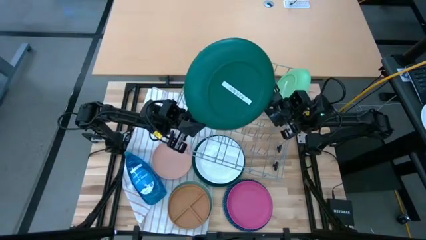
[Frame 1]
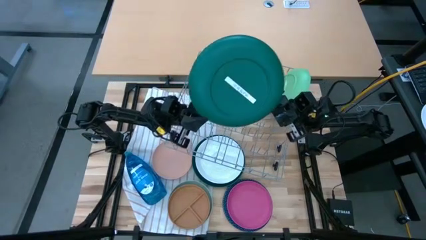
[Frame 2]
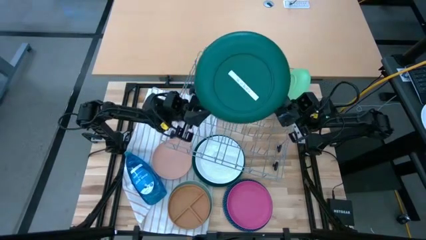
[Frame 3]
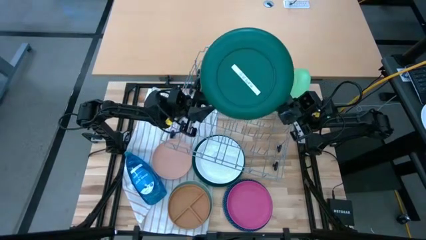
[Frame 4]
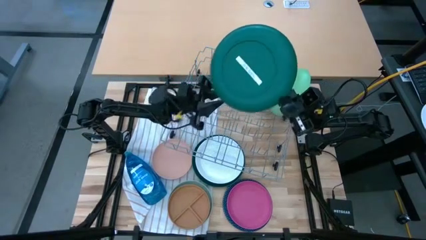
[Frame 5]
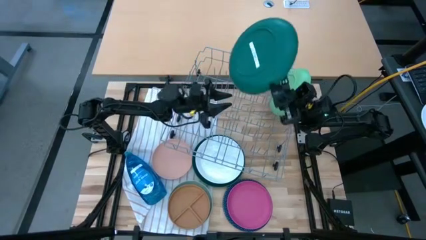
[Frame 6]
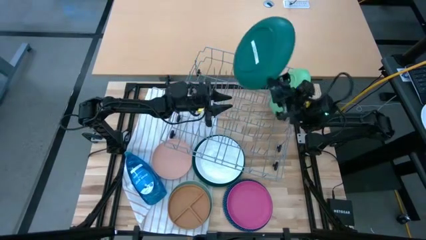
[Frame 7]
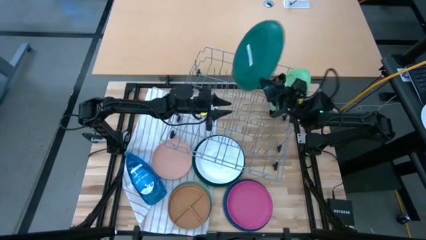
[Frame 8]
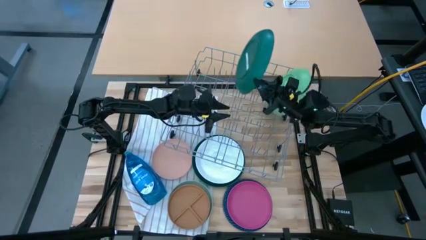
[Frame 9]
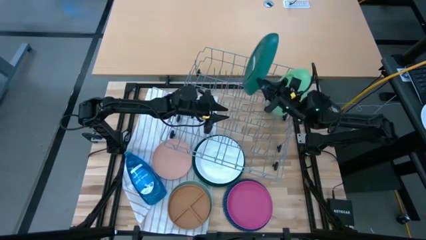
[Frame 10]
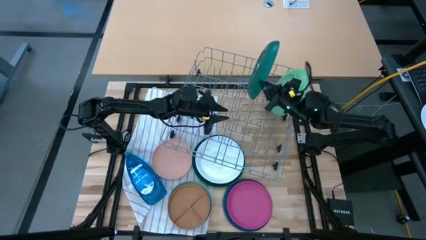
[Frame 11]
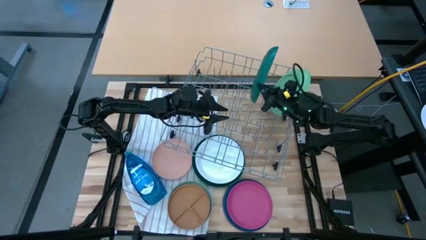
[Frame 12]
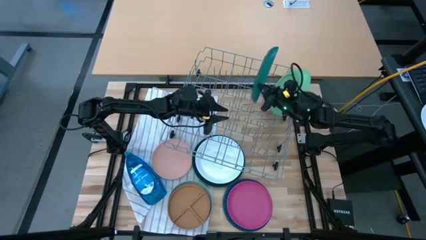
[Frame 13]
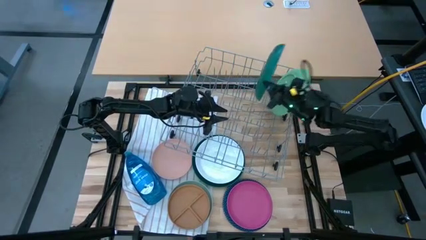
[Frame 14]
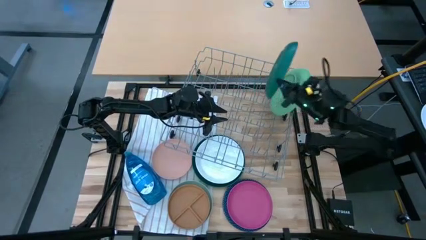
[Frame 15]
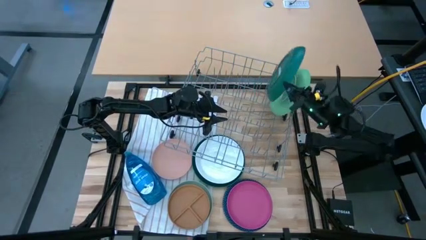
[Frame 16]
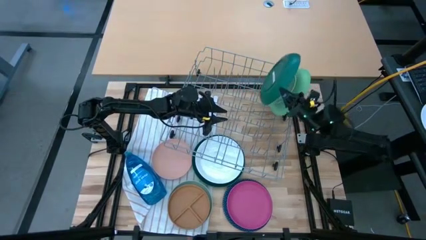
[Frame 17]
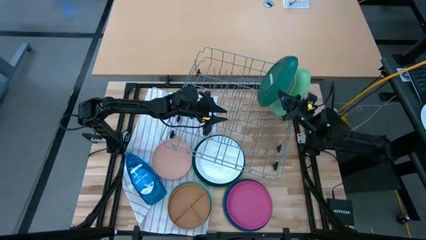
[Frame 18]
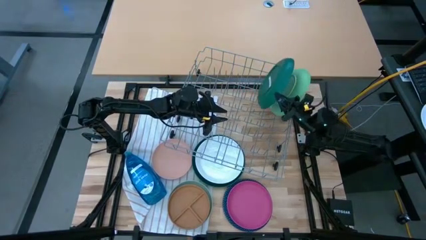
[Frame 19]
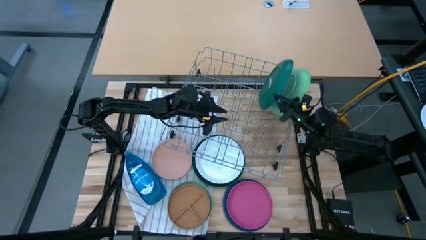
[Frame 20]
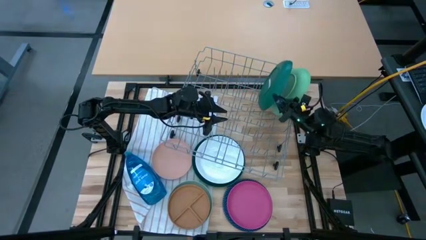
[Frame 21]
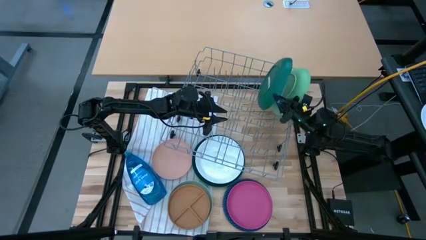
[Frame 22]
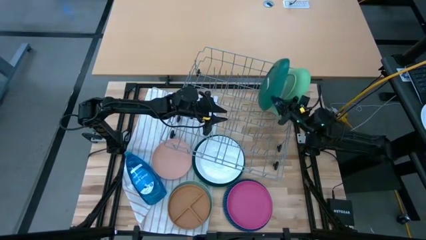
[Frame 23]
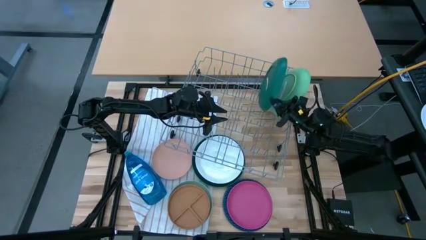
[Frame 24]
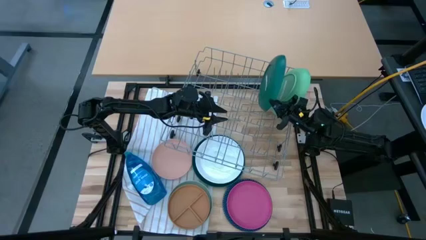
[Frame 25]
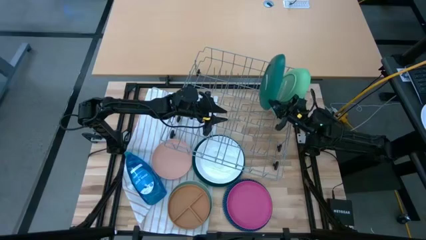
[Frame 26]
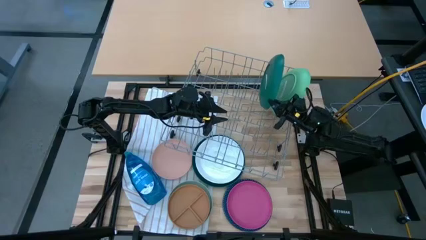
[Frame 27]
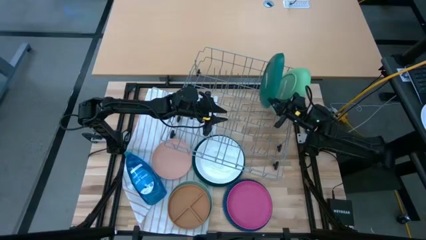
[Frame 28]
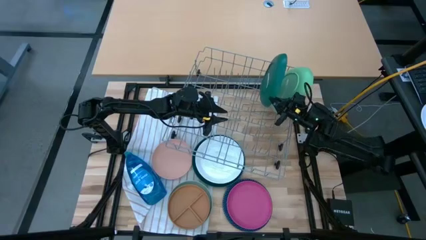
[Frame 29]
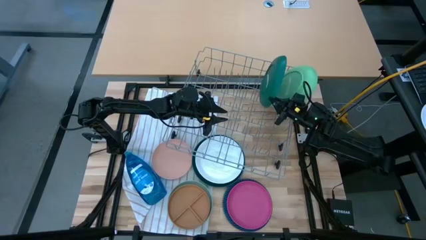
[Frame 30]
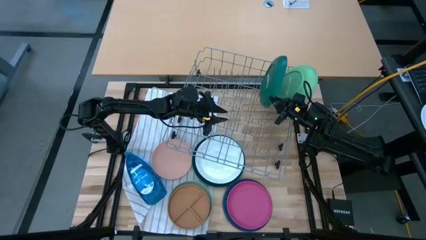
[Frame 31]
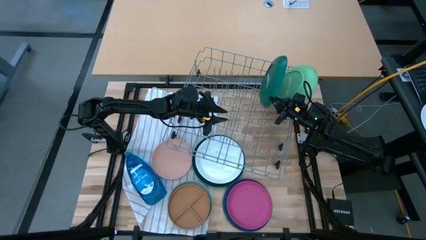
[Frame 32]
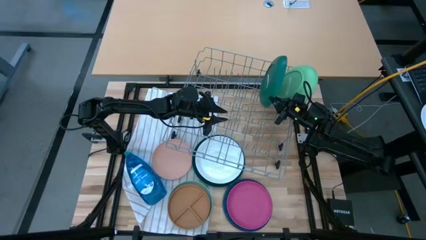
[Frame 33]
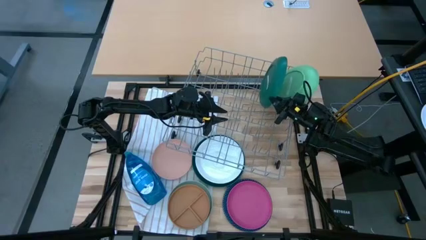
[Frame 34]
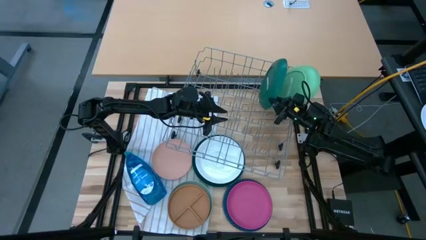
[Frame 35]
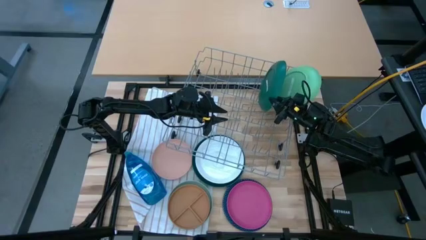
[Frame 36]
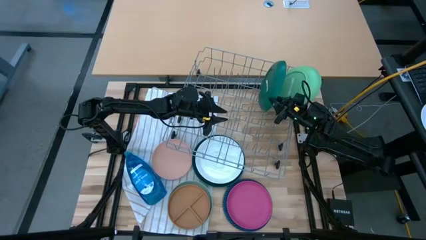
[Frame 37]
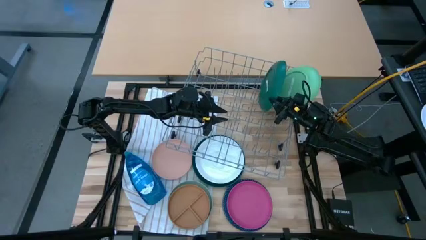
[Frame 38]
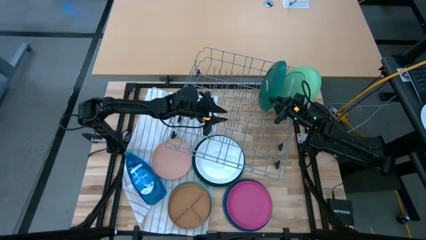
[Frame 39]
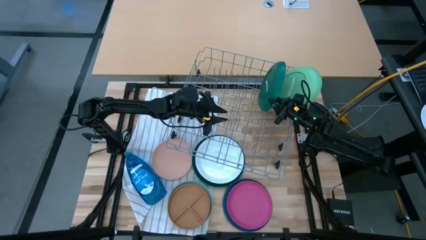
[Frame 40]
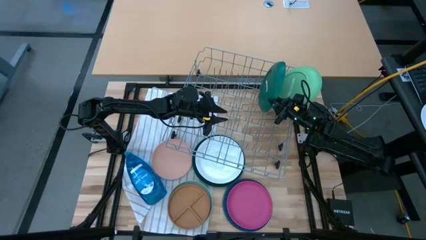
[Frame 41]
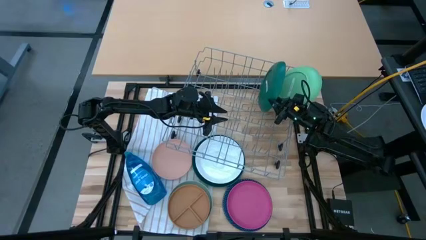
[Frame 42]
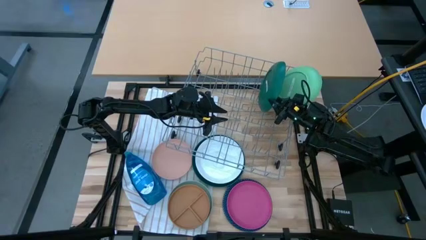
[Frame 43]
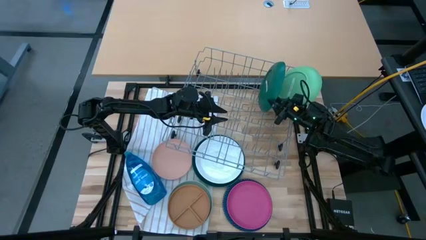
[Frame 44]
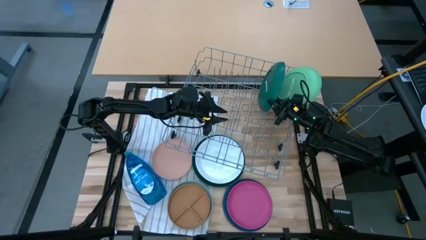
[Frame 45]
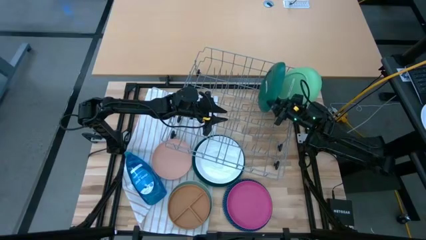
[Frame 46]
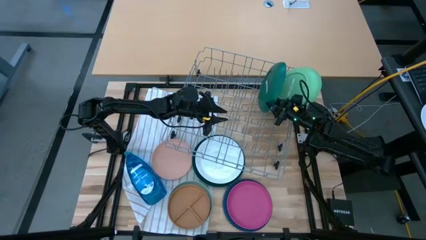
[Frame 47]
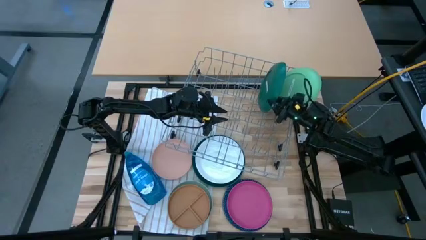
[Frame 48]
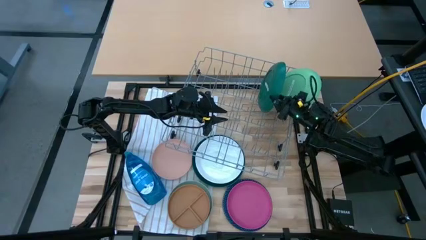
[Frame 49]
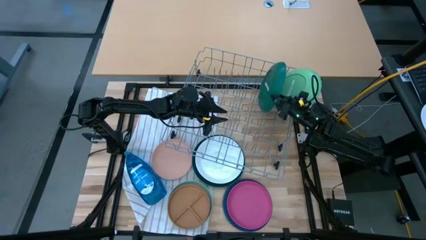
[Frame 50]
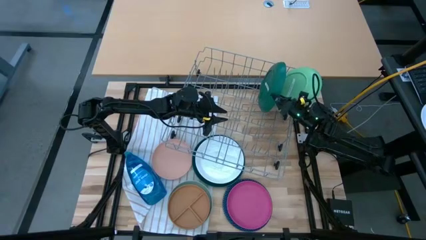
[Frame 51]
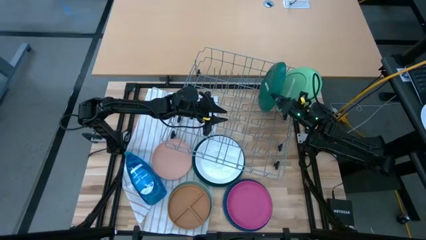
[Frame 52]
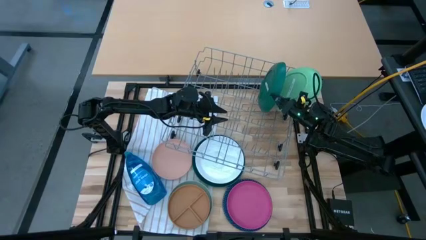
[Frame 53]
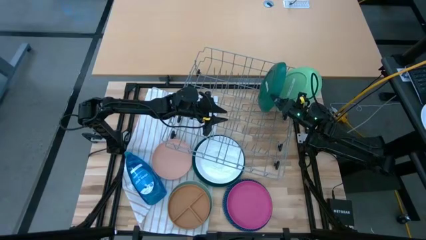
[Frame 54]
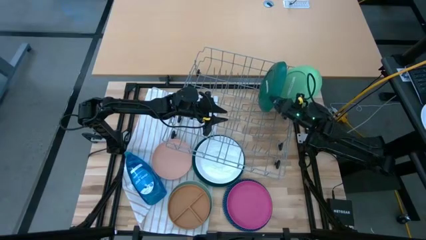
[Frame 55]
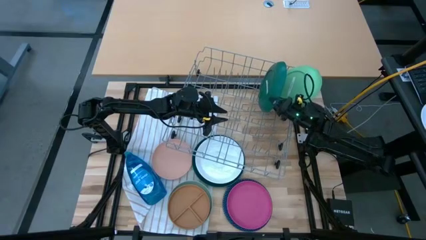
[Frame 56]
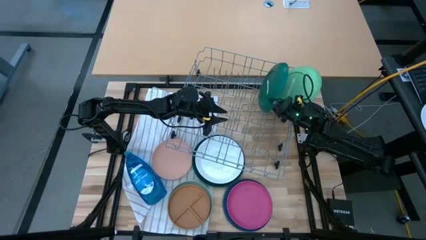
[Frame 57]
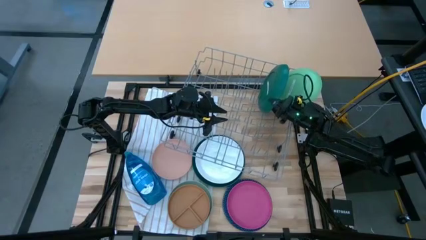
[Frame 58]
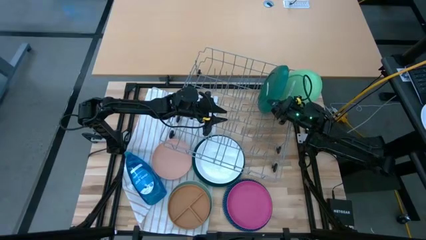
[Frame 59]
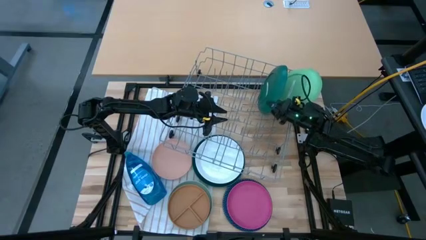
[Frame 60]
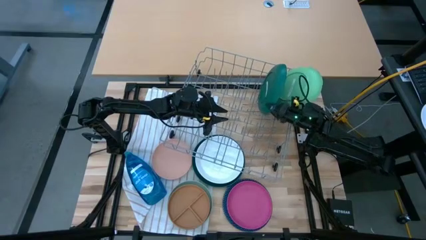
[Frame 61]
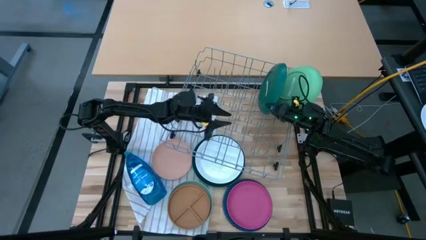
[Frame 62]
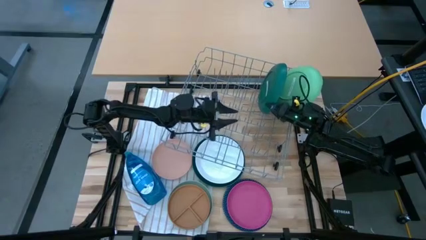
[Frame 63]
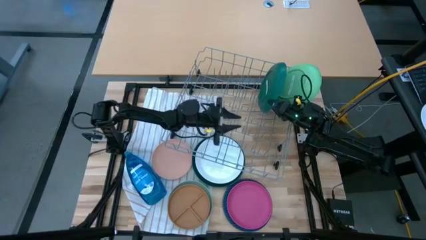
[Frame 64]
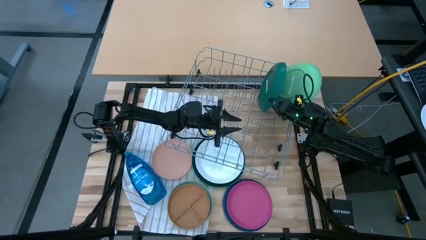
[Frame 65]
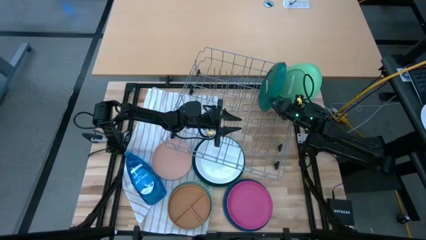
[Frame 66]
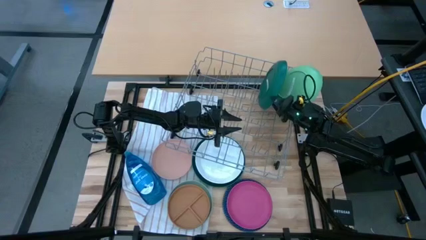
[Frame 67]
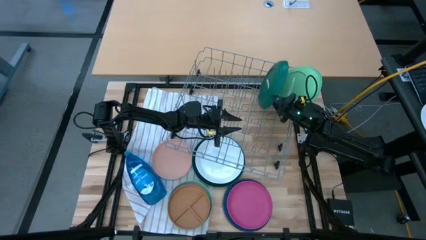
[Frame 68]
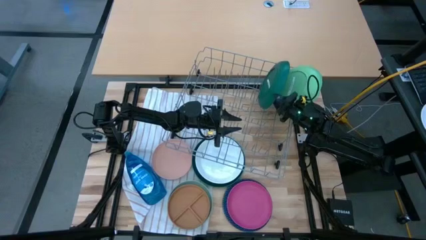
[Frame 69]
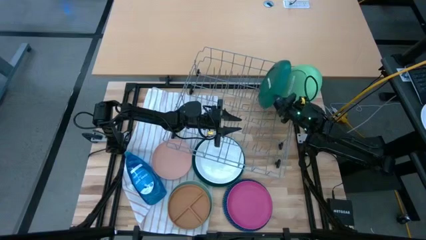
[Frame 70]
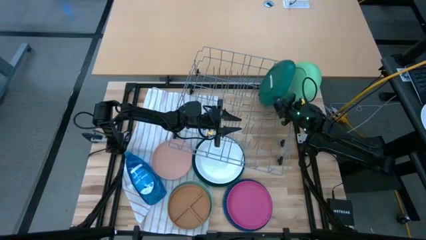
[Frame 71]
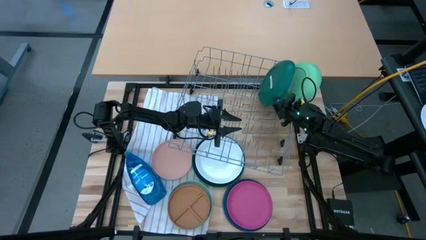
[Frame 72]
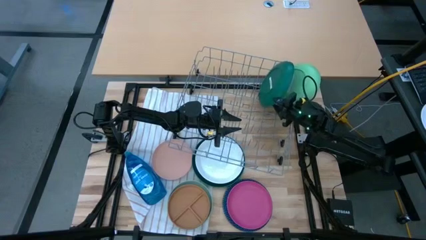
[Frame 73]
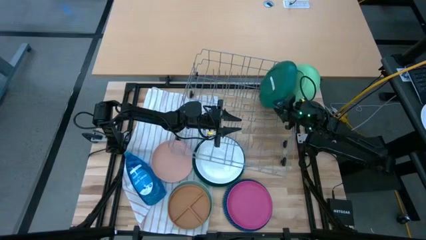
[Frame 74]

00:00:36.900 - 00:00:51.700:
Task: Sort dishes
Put the dark green plate in the dish rack

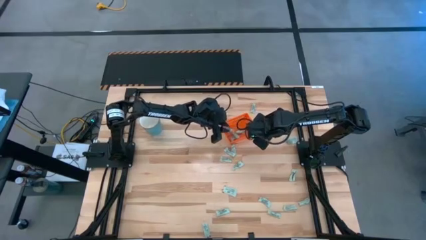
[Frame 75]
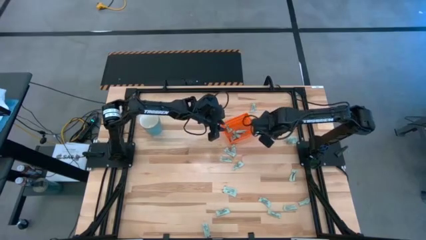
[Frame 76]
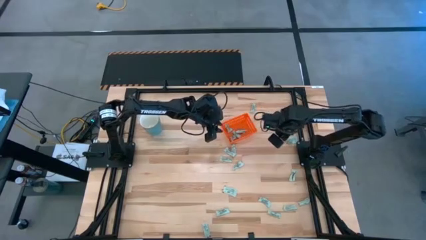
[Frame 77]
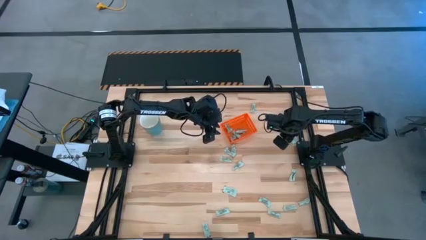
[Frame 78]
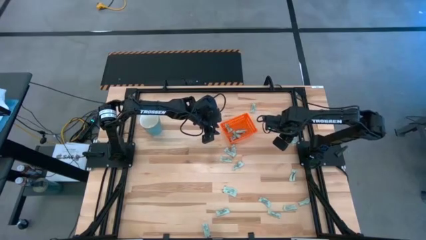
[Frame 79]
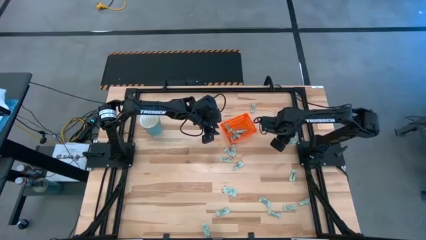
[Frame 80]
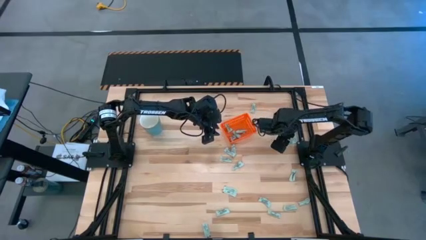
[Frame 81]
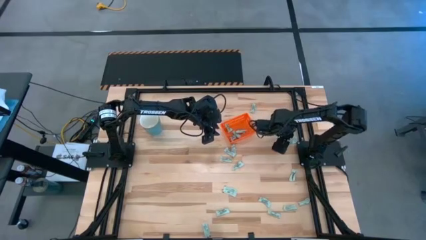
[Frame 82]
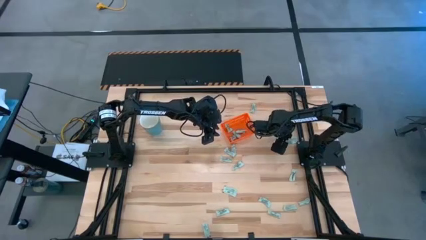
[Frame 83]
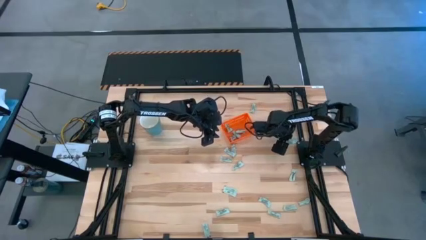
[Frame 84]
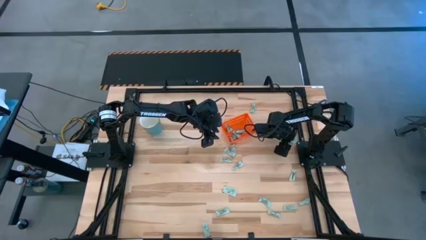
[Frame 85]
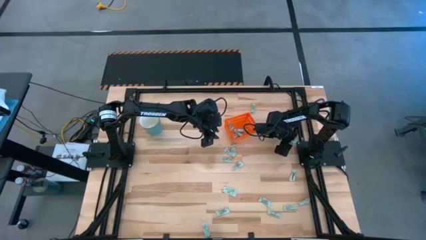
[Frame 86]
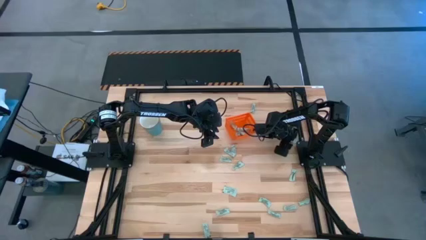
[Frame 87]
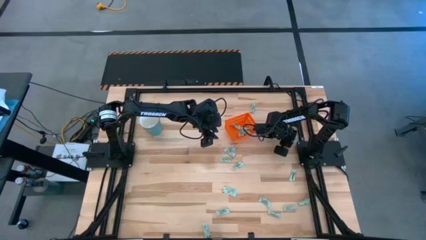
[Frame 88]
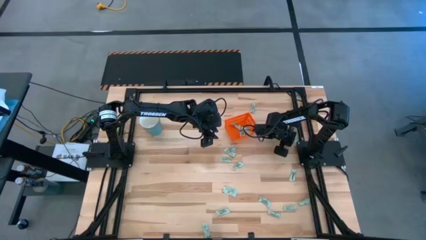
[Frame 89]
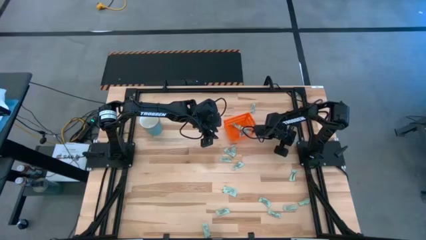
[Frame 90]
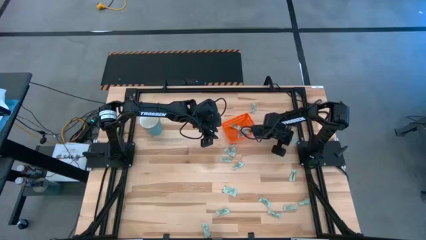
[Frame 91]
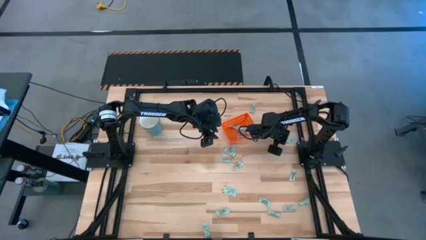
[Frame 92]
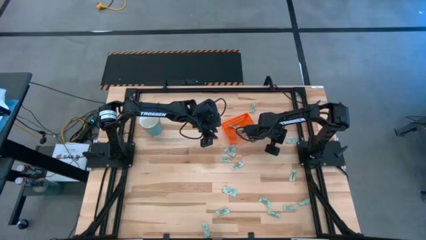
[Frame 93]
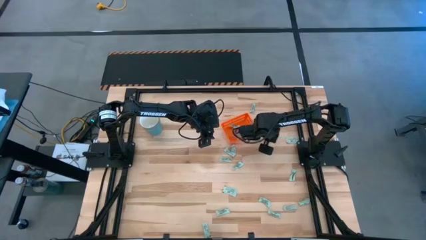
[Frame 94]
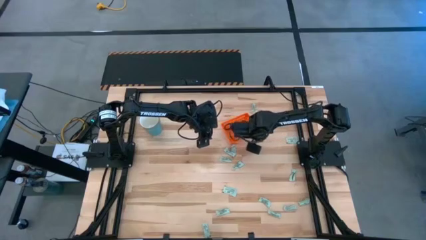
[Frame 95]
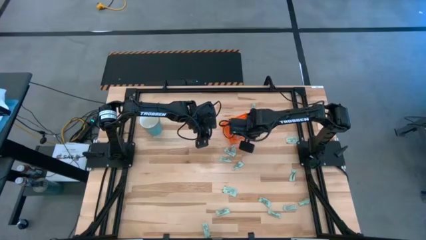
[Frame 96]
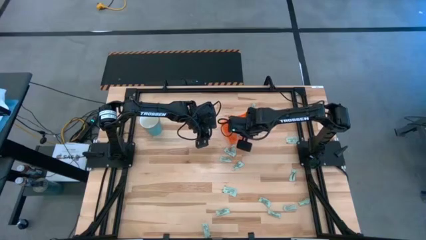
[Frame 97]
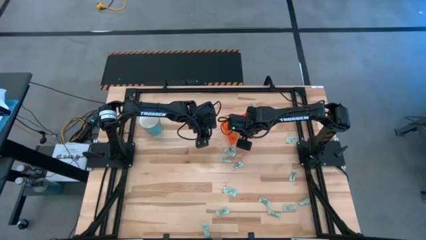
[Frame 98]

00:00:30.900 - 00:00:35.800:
Task: Pick and place Stevia / Truvia into bins
Put the stevia packet into the bin
